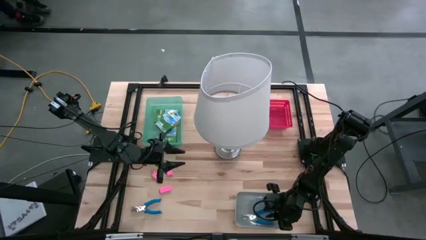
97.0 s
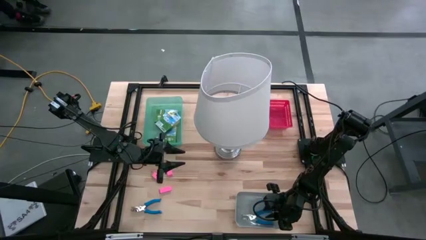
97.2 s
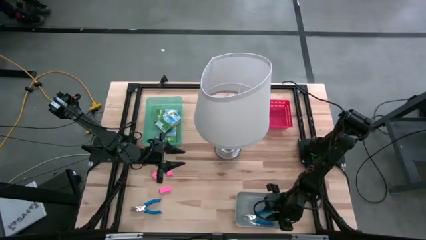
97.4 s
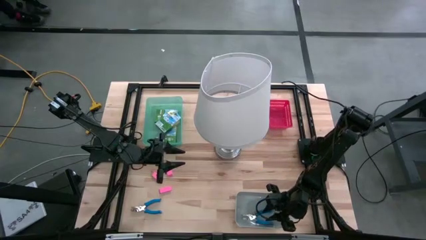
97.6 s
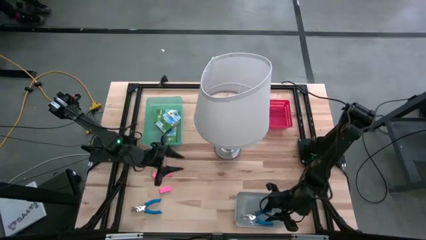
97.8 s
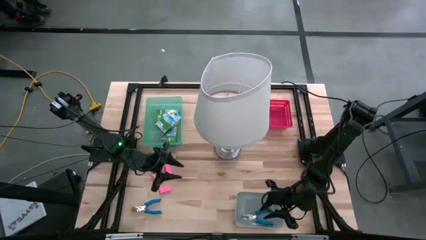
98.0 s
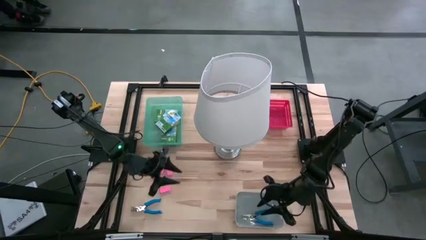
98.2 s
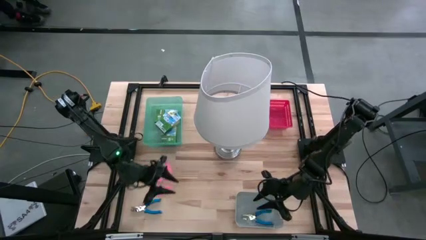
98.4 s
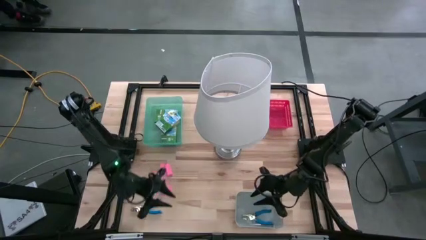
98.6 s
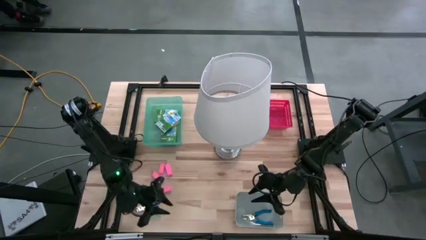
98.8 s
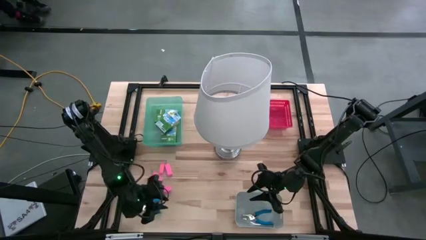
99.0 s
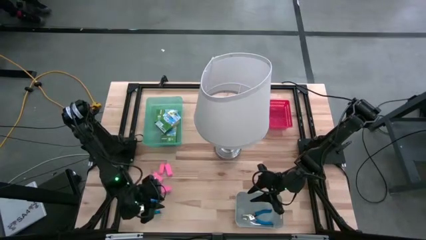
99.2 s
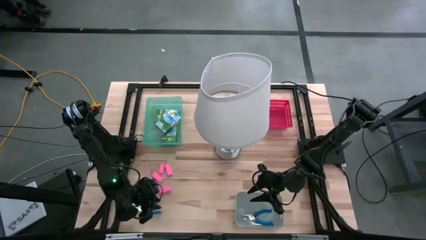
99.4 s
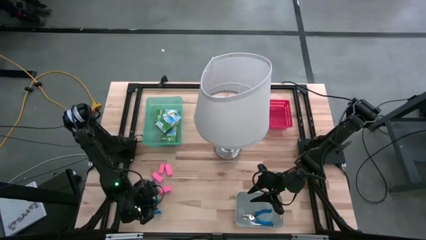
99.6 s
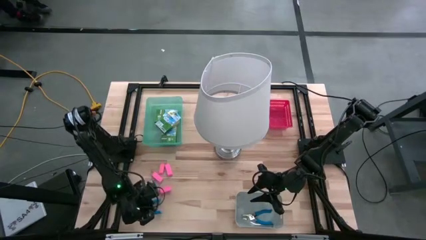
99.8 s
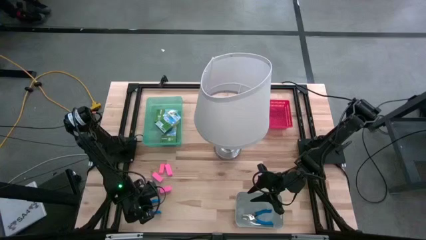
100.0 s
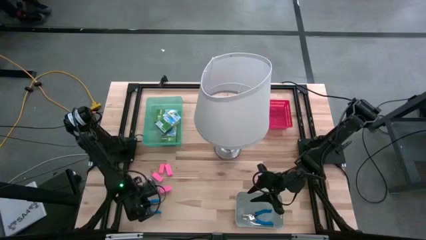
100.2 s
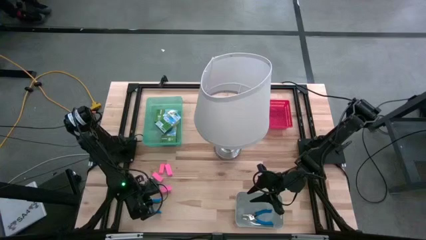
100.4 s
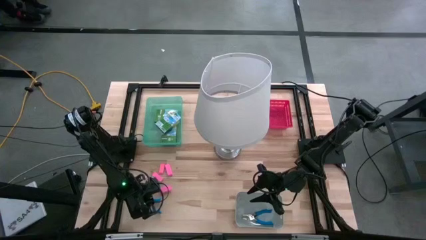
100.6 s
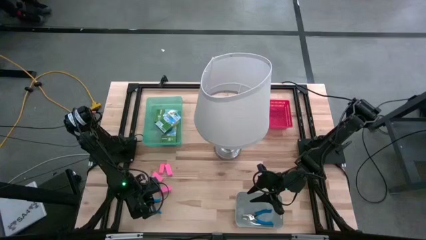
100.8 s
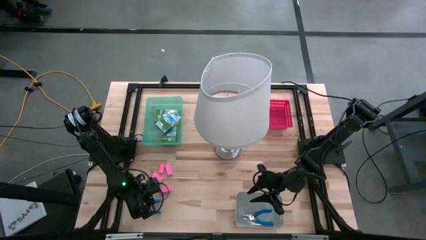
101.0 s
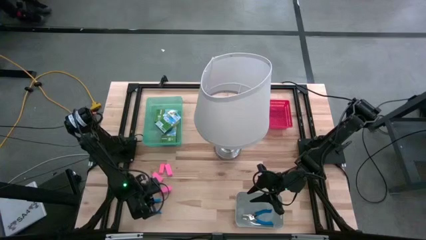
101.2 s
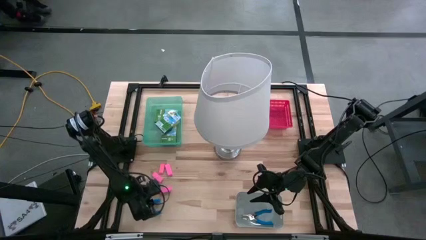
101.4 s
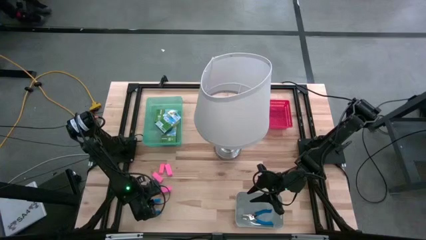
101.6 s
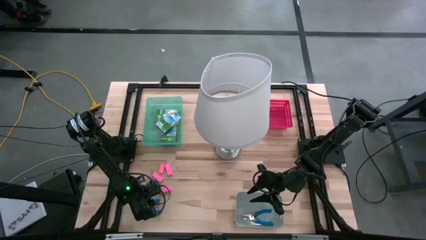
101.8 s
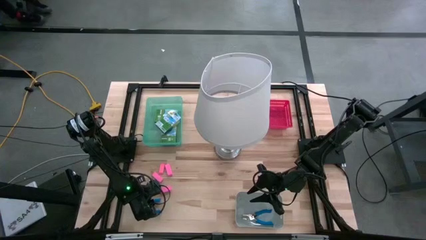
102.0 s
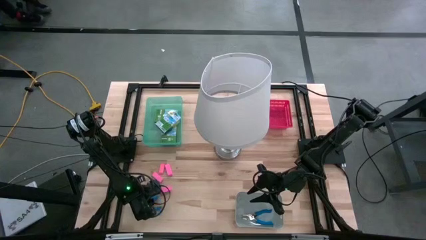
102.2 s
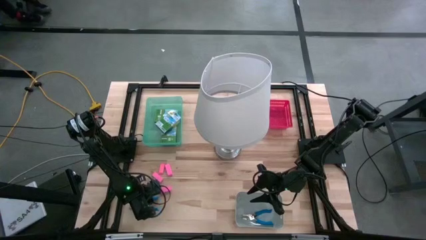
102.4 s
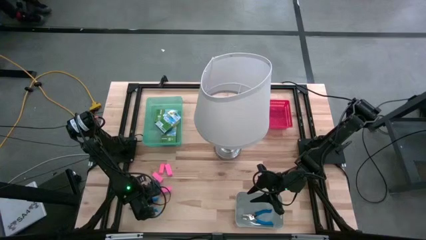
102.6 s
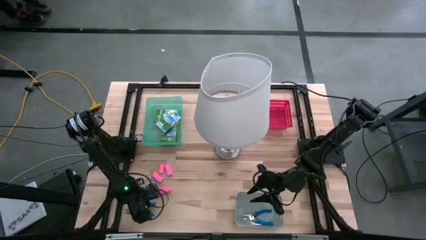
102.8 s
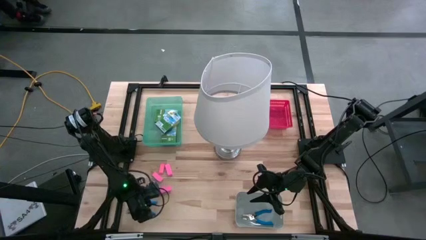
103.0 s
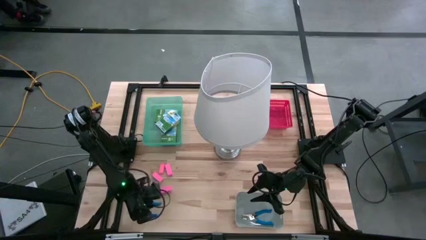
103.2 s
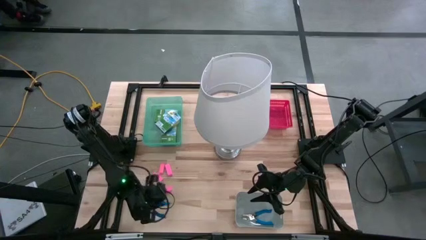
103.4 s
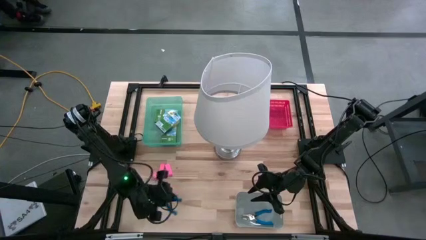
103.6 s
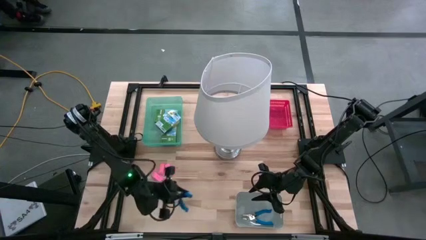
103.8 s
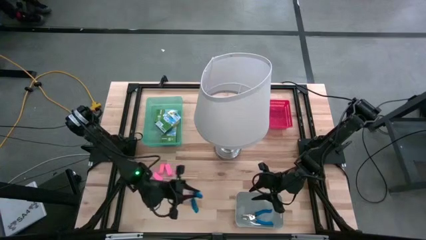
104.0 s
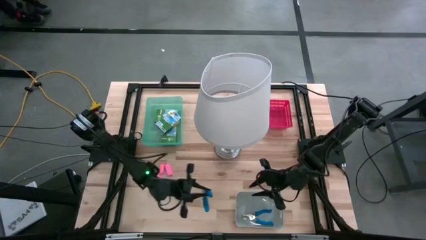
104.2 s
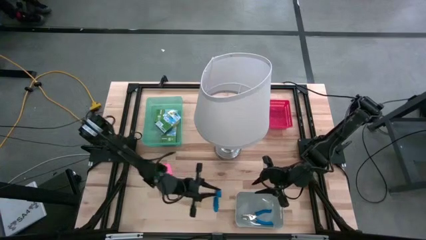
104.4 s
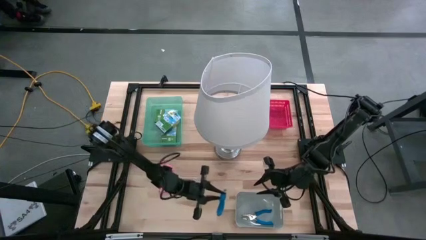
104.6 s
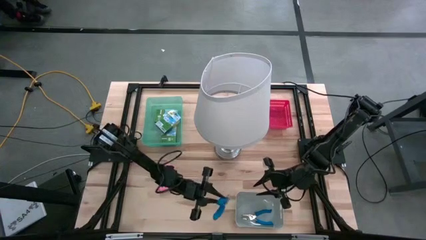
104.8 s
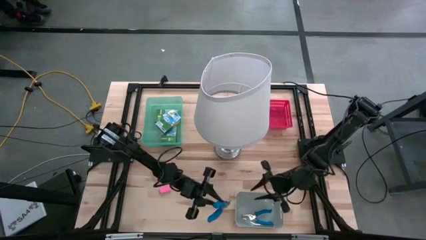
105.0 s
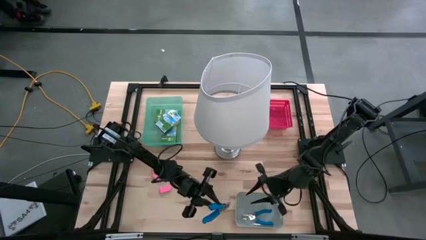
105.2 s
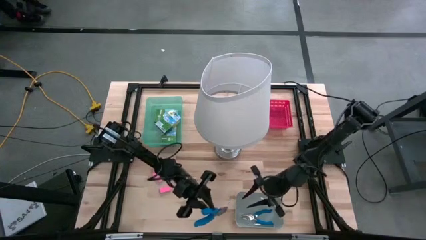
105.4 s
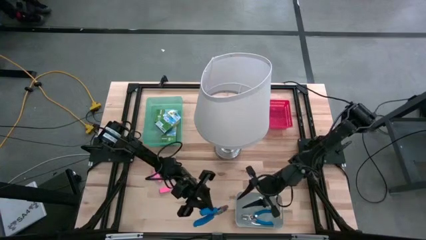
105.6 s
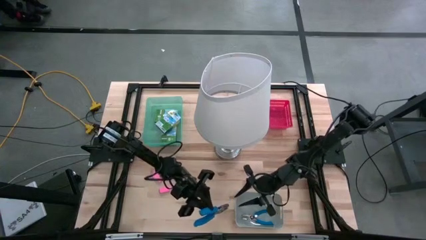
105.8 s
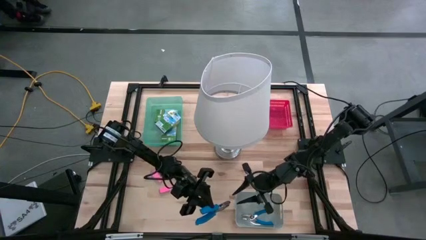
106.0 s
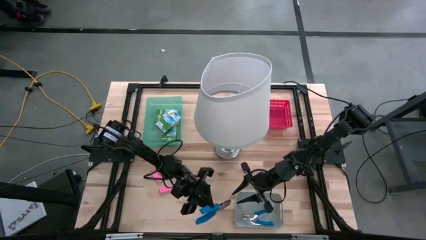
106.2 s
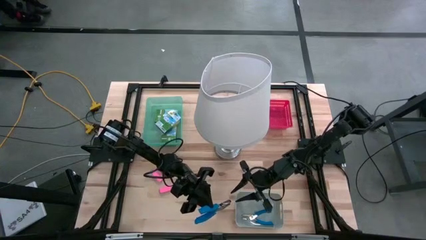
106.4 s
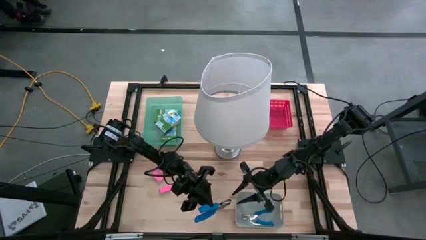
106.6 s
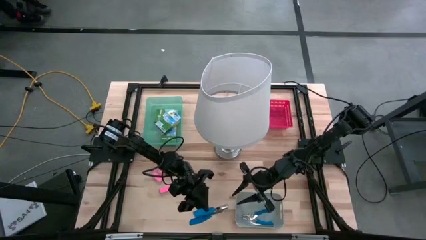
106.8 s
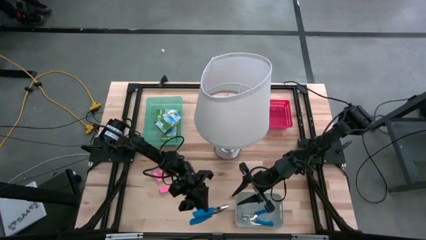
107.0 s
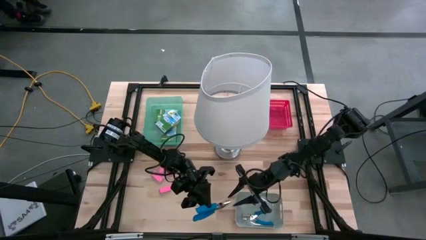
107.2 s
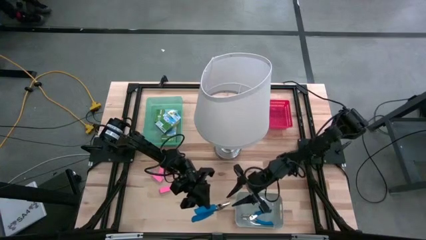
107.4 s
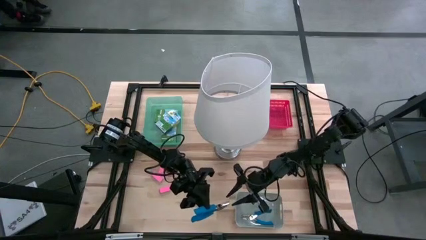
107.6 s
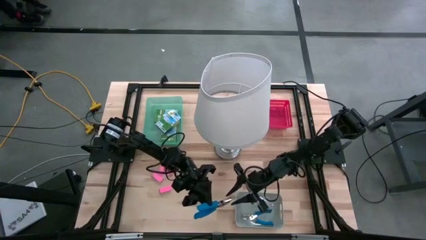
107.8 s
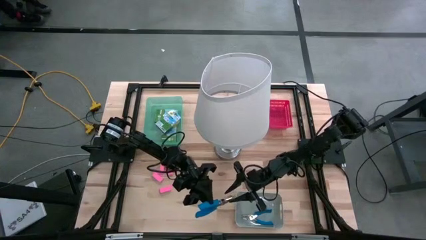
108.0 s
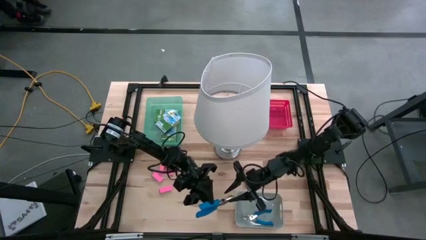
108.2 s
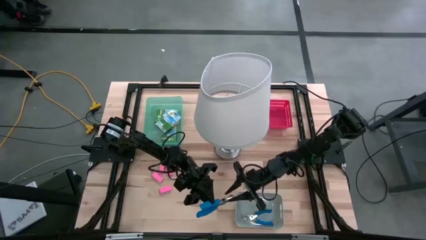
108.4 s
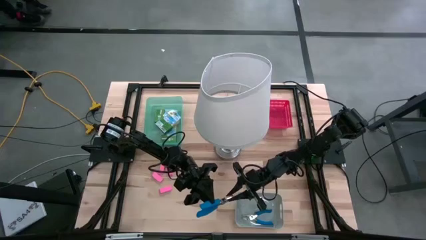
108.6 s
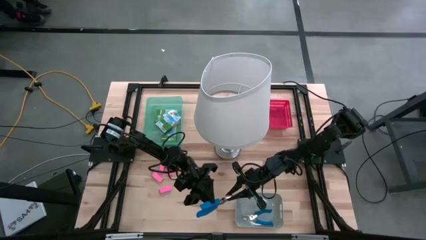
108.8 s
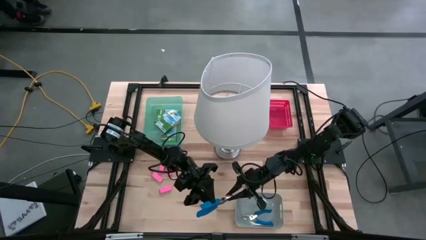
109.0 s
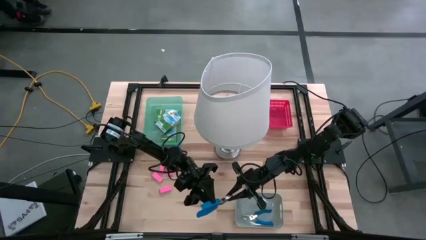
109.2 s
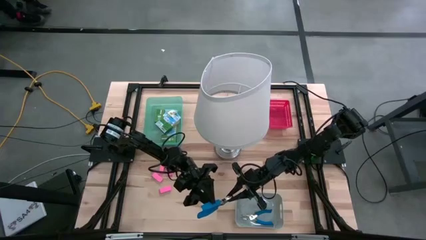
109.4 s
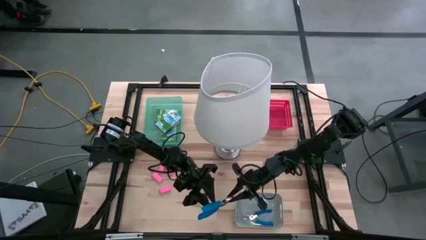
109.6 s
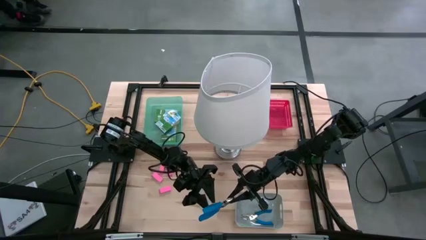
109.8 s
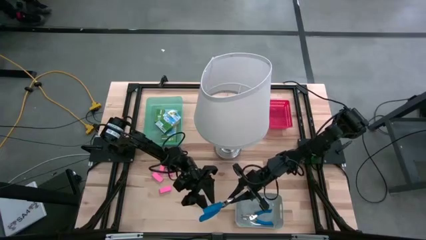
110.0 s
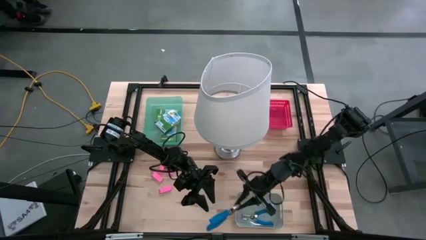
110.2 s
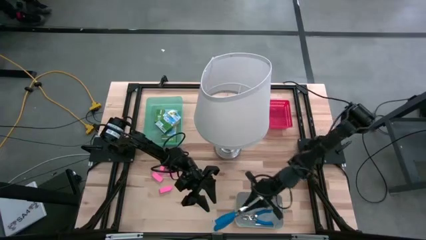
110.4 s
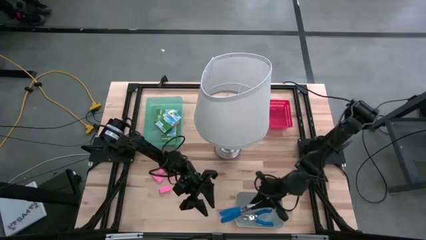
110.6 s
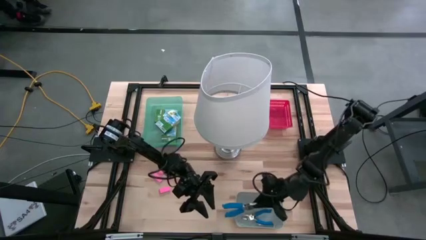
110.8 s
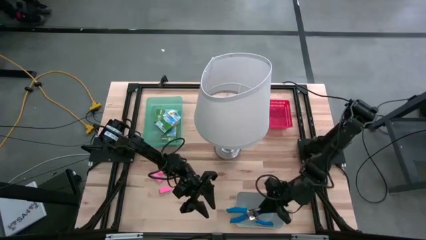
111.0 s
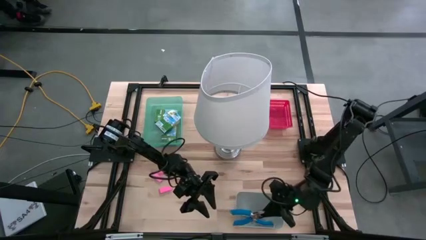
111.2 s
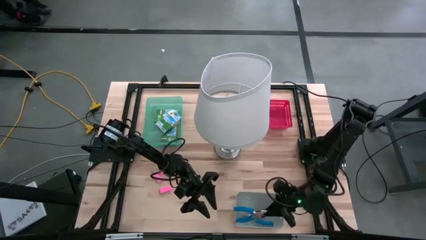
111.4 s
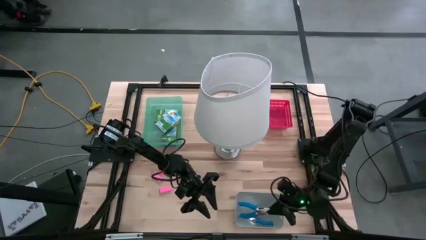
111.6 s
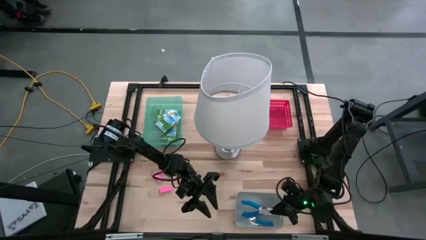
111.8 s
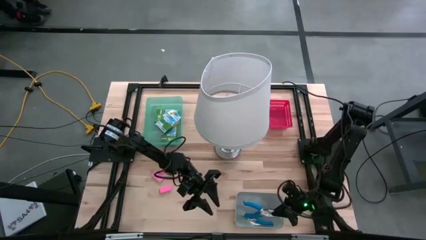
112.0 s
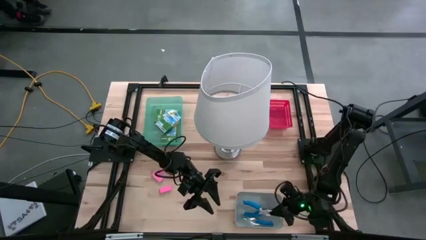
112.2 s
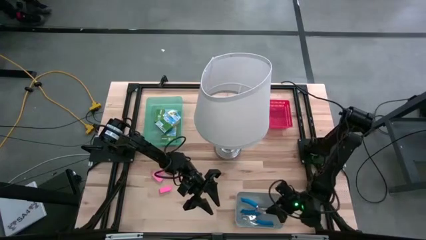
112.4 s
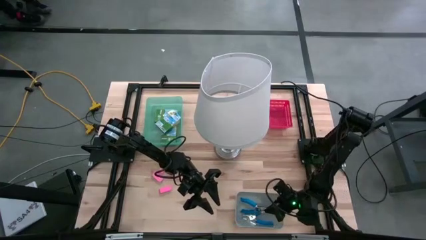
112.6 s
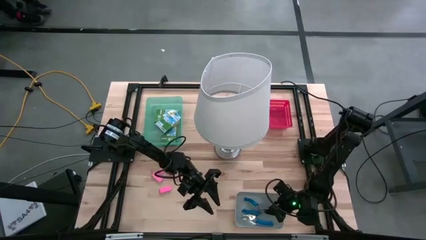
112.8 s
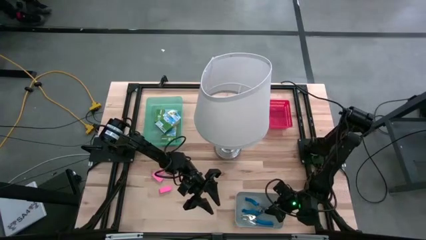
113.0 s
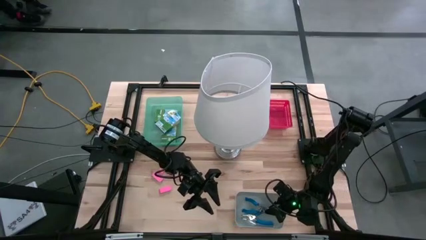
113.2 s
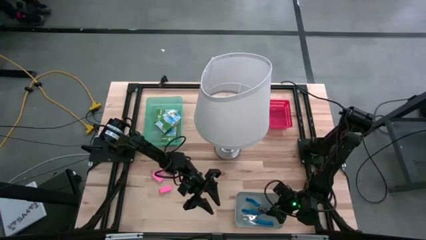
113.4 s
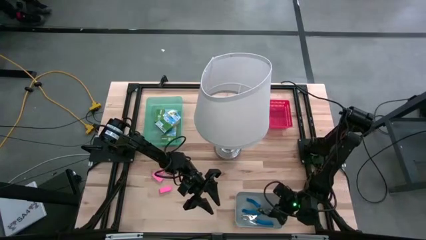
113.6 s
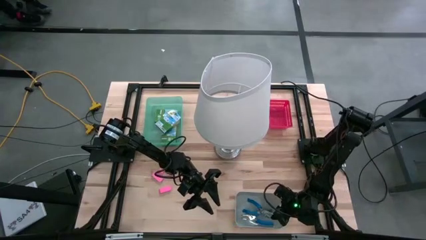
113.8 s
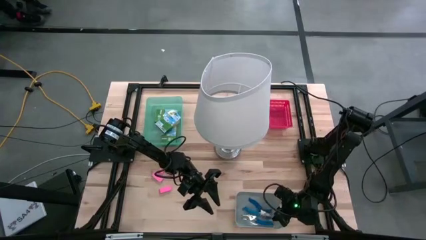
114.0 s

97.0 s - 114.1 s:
Task: Pick & Place School Supplies
Put the blue hole puncher into the gray bin
